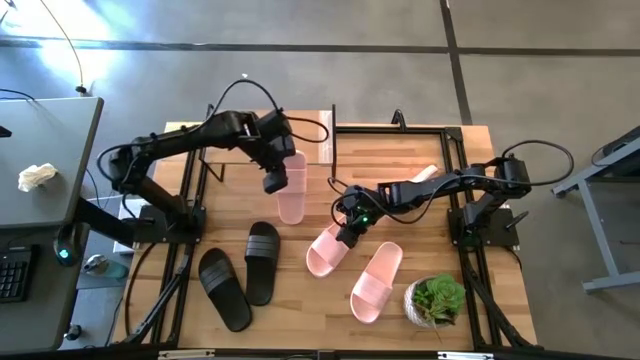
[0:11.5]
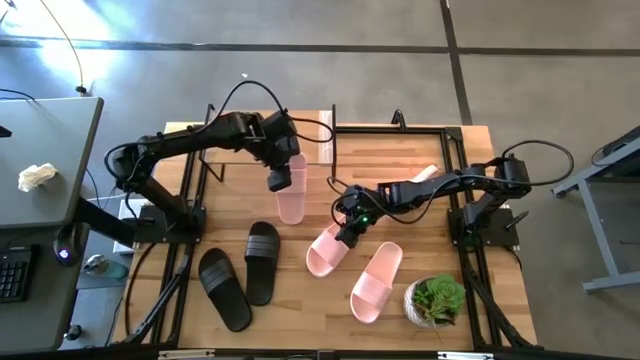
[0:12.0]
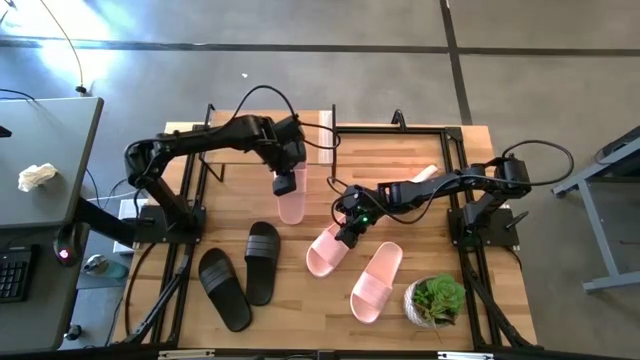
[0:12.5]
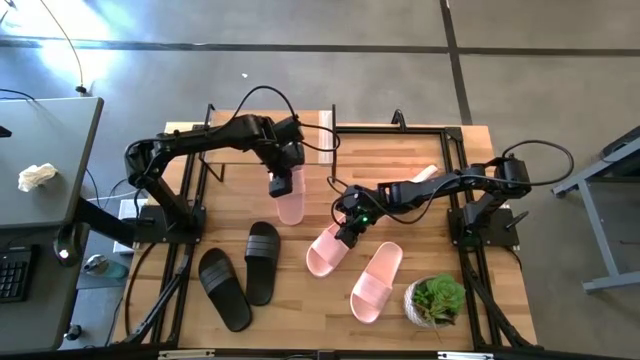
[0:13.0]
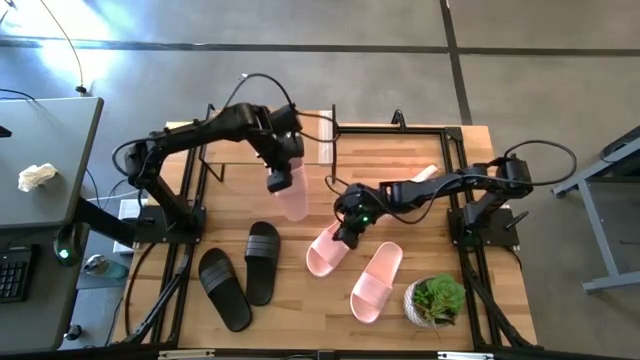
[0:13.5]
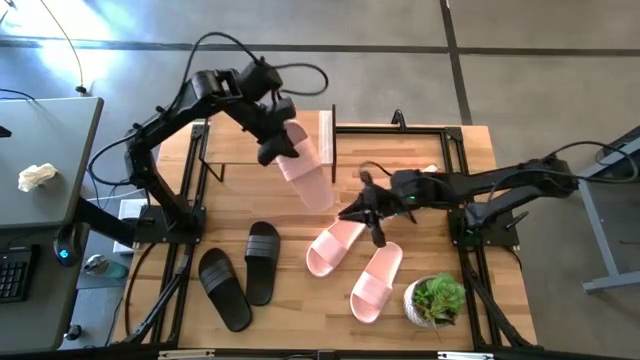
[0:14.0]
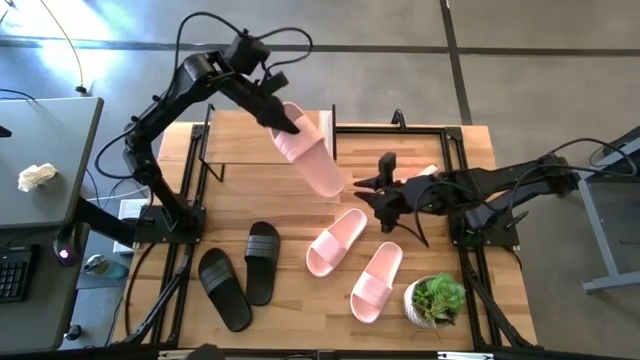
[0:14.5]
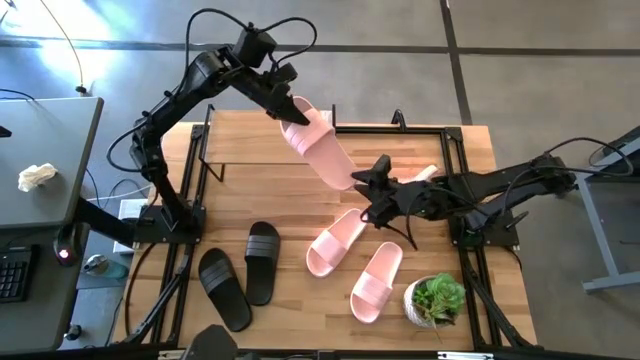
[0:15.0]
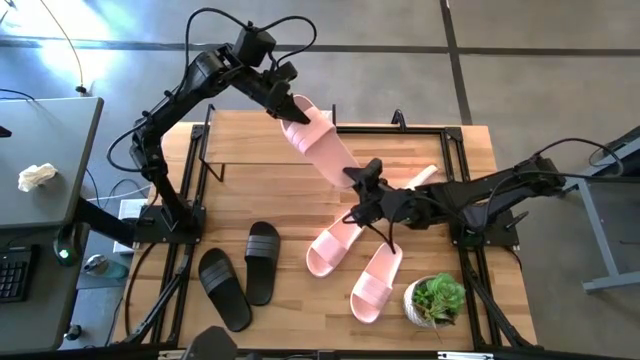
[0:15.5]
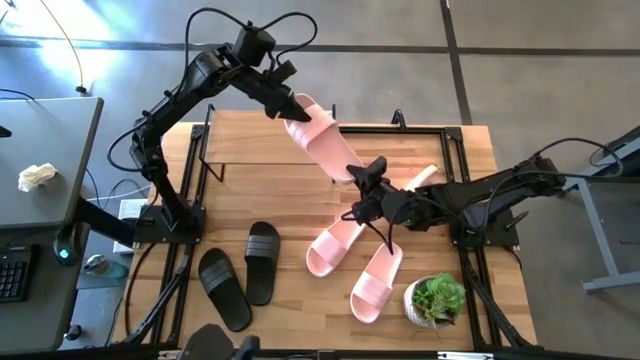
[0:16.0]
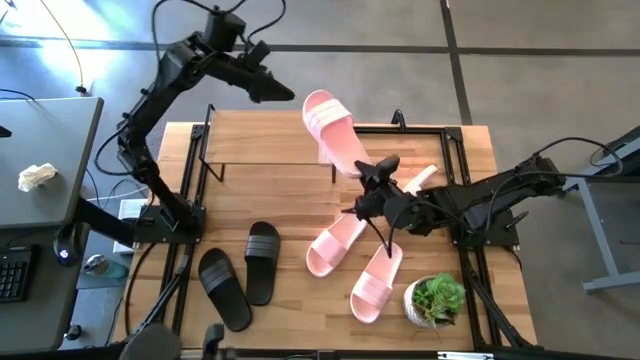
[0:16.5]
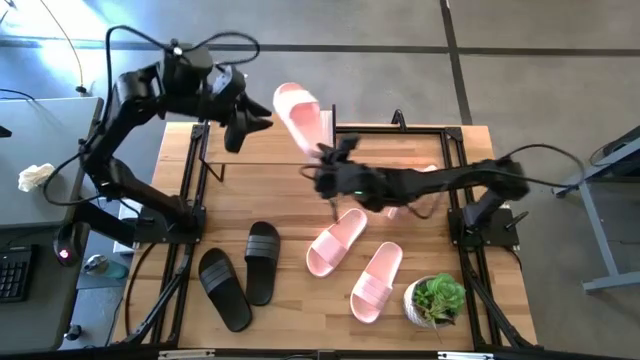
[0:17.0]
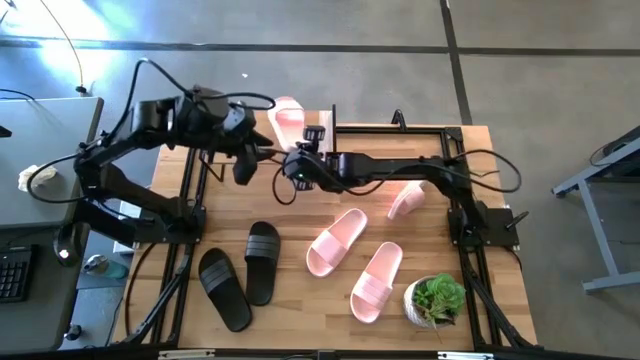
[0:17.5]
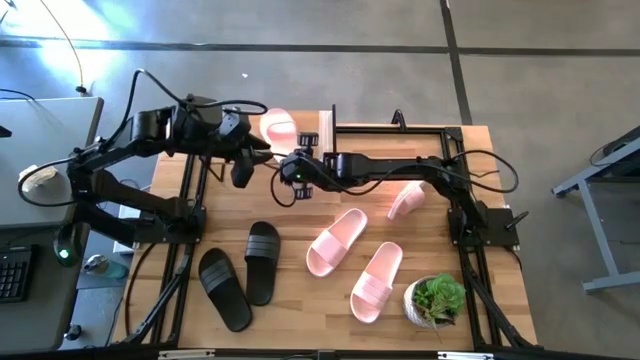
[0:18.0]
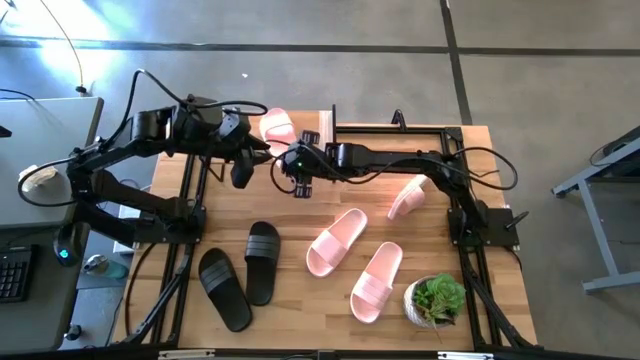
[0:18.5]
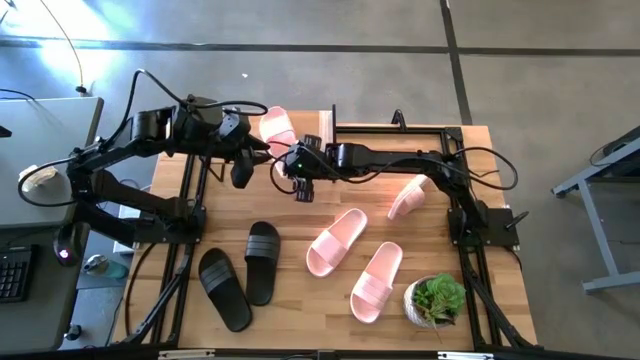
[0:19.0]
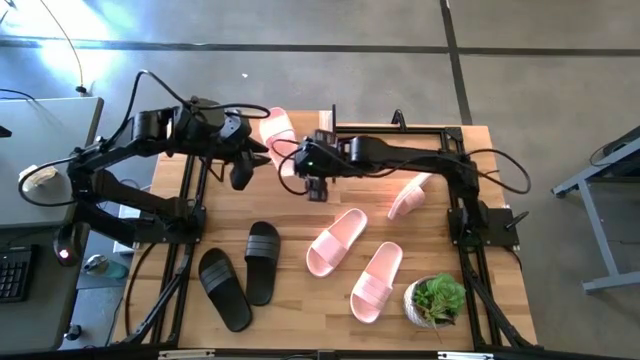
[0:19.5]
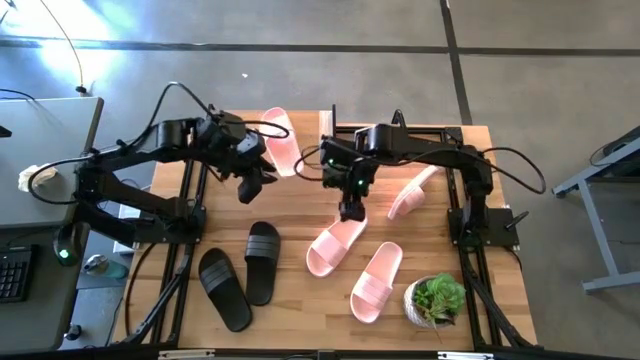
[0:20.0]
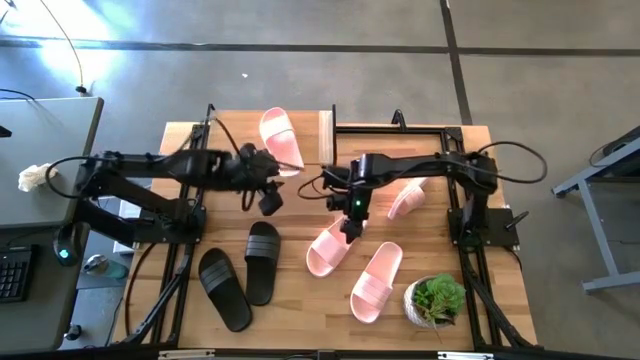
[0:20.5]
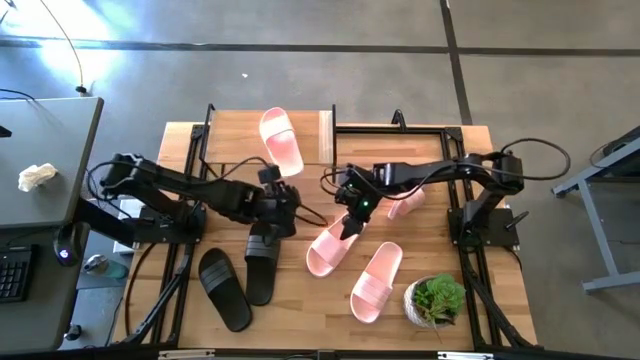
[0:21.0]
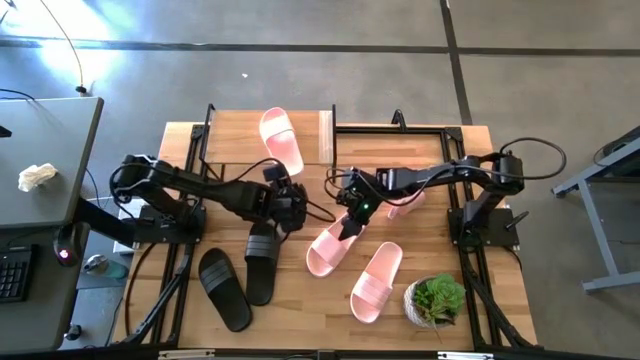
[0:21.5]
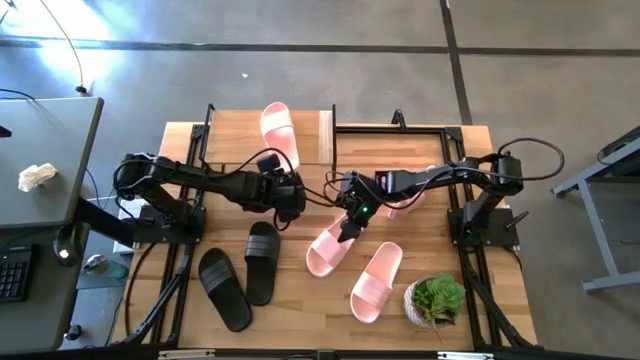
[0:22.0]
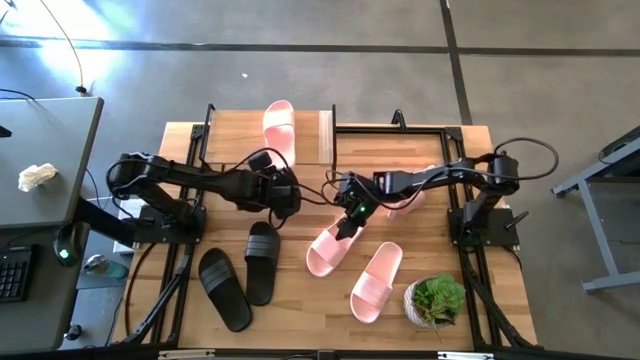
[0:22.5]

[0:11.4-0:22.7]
Task: Pick and place slides into the shelf
Put the pink slide on the shelf

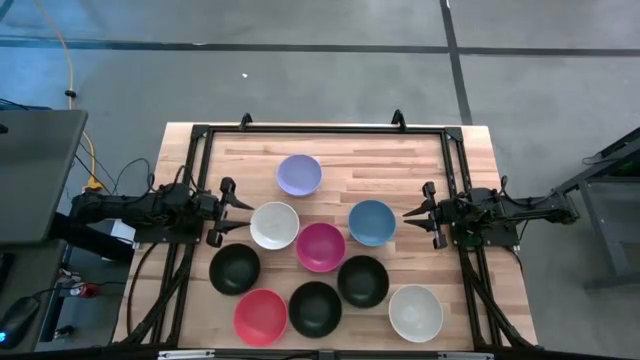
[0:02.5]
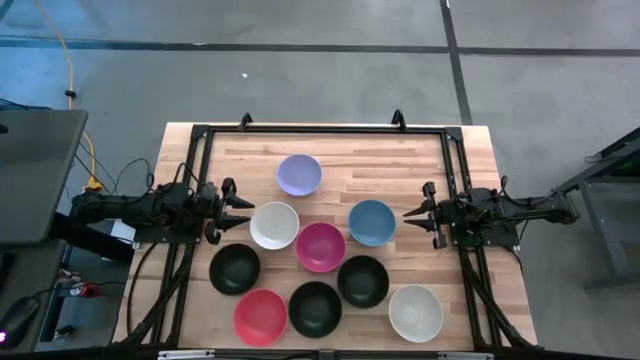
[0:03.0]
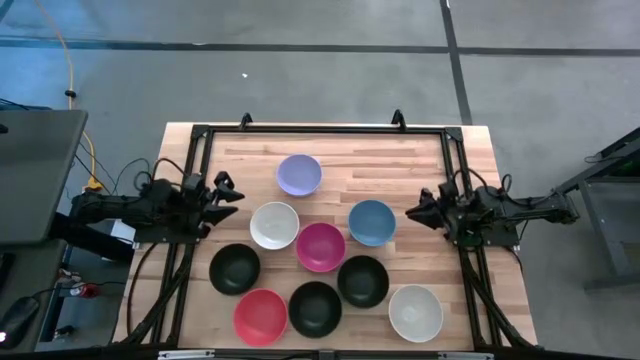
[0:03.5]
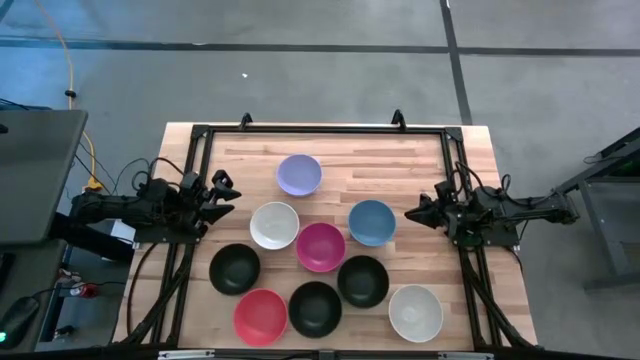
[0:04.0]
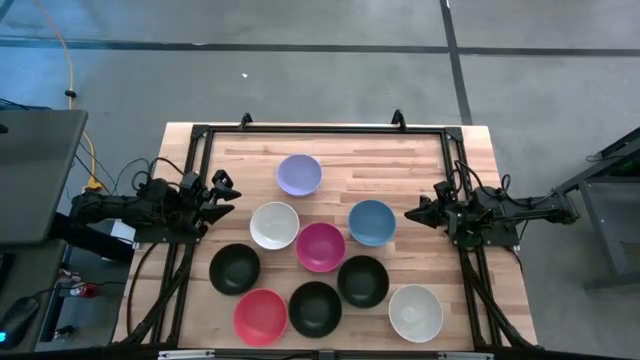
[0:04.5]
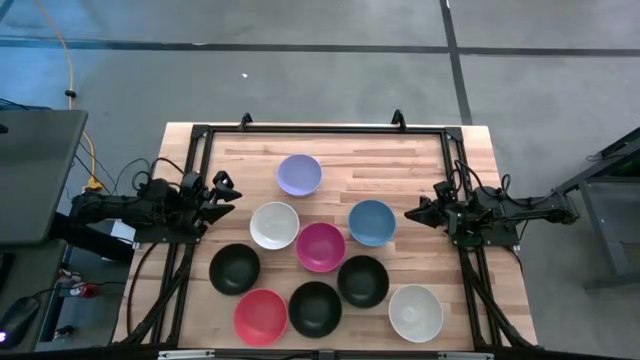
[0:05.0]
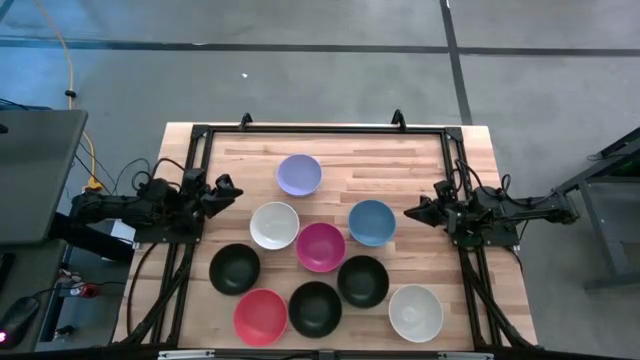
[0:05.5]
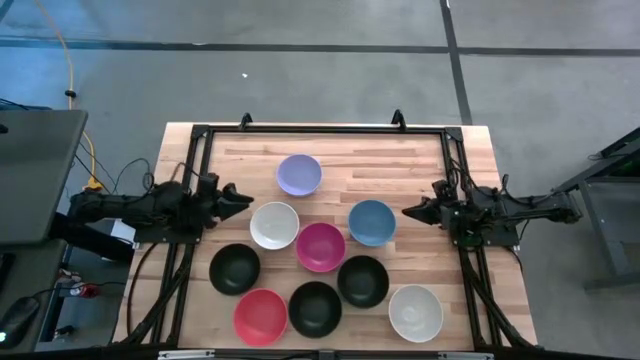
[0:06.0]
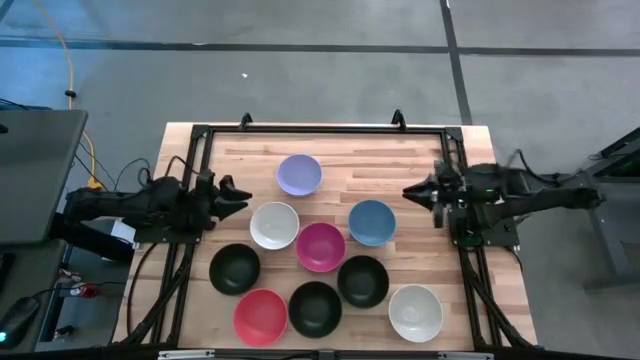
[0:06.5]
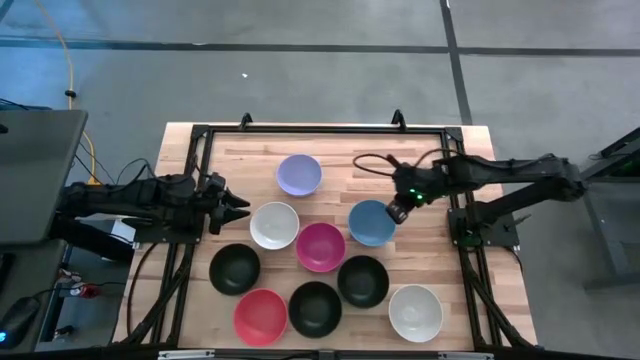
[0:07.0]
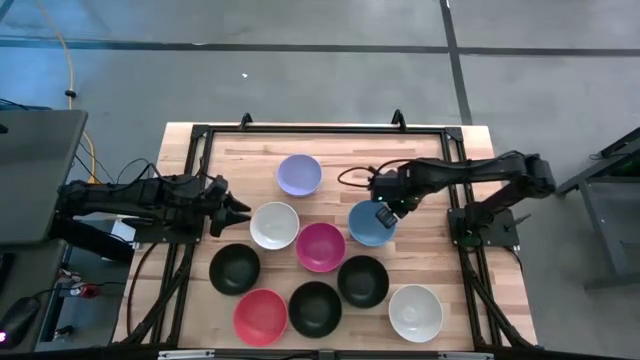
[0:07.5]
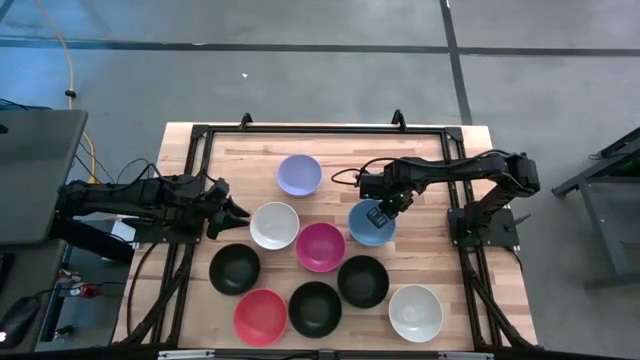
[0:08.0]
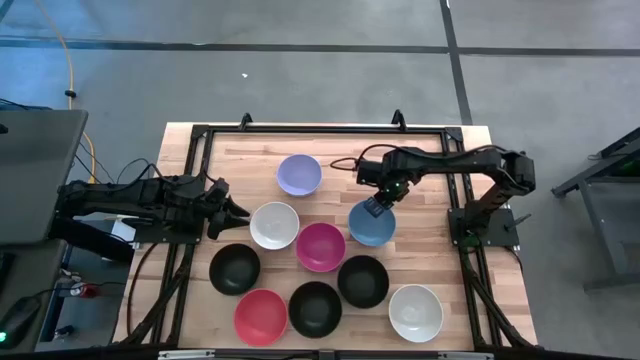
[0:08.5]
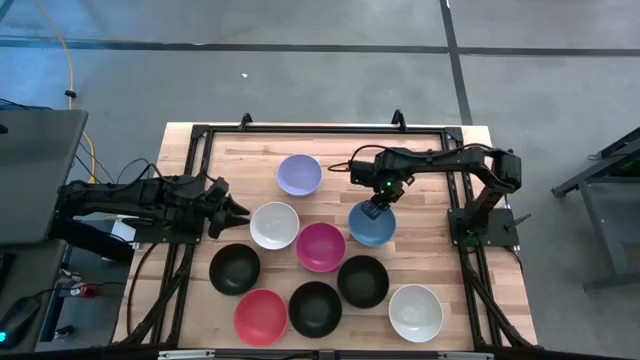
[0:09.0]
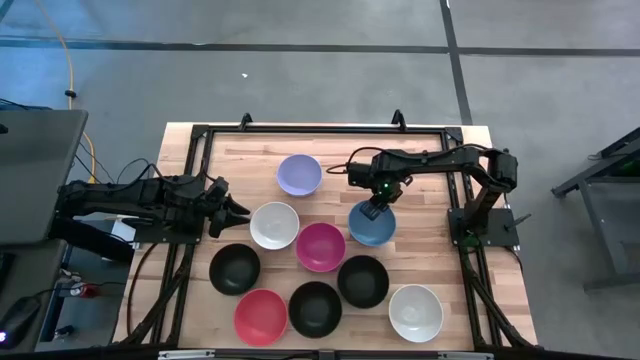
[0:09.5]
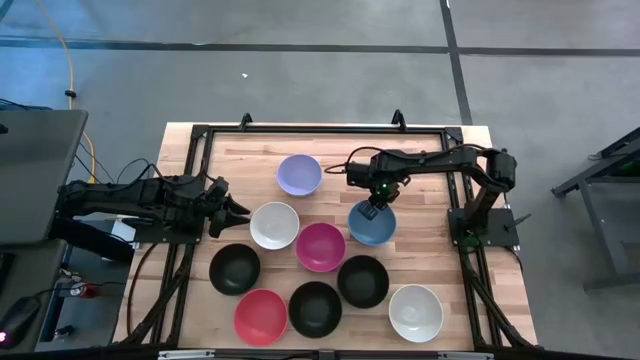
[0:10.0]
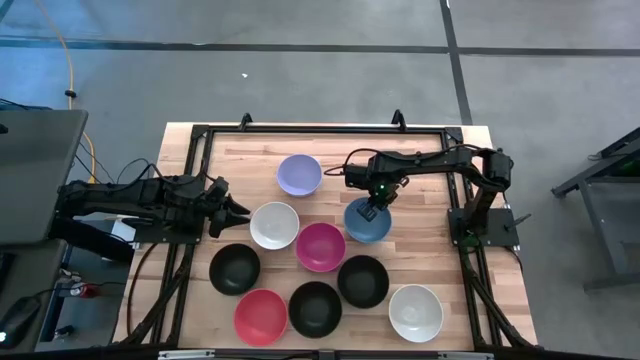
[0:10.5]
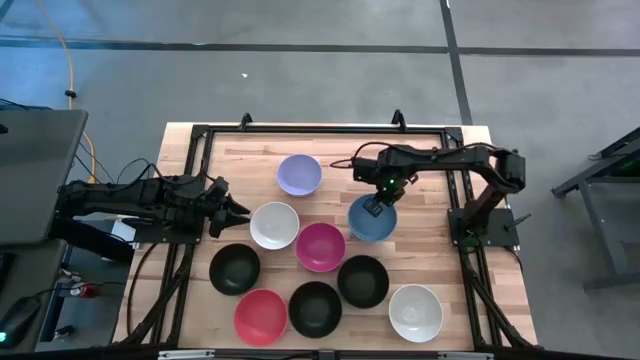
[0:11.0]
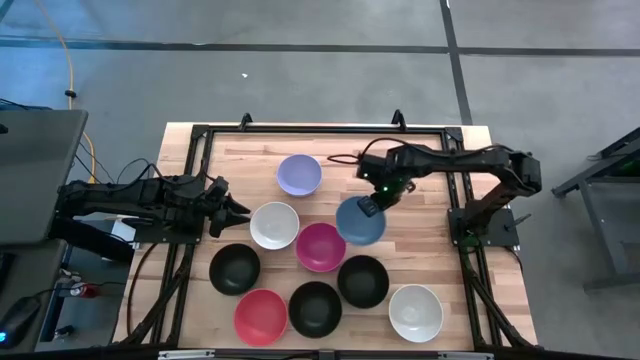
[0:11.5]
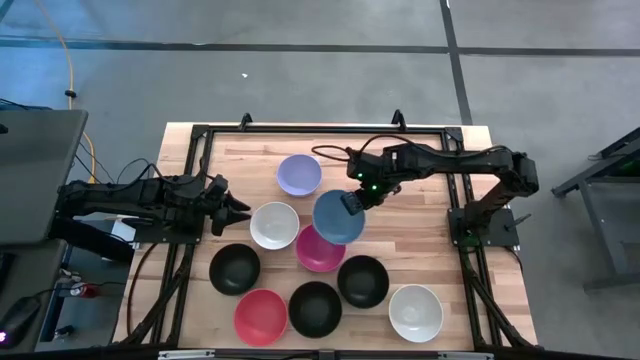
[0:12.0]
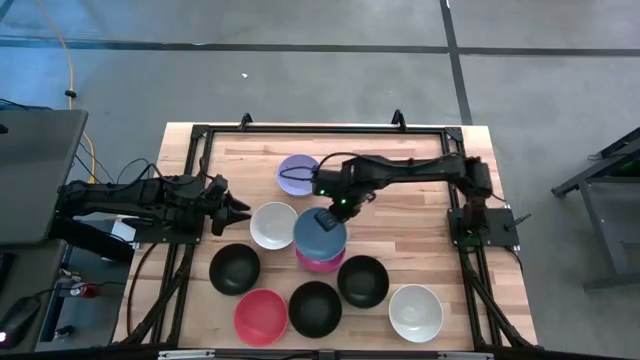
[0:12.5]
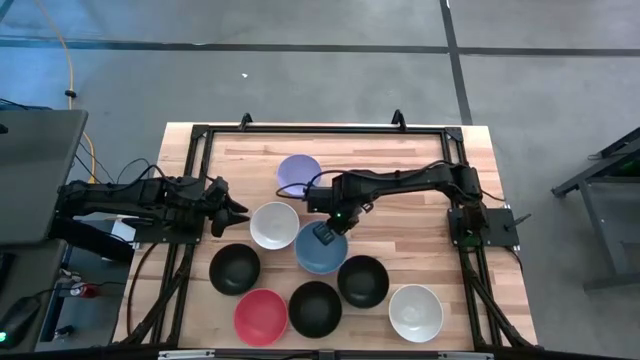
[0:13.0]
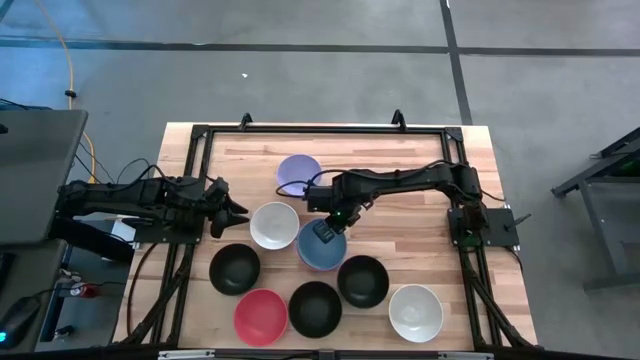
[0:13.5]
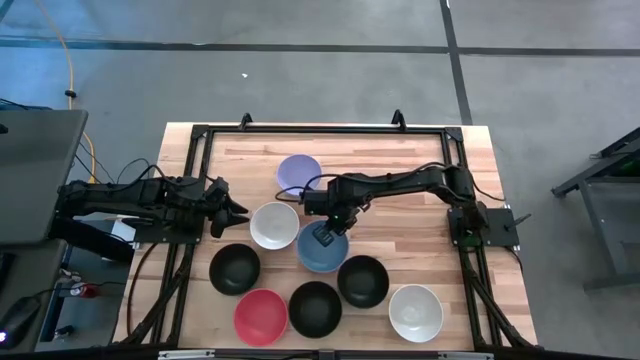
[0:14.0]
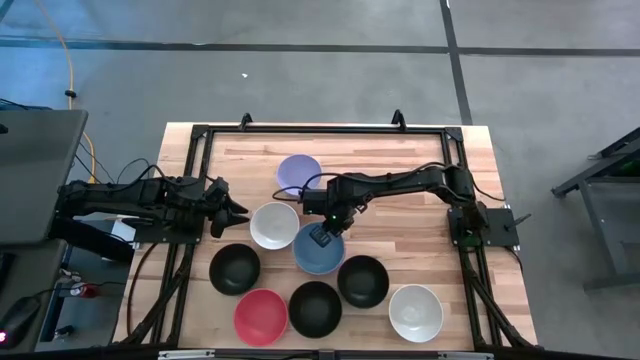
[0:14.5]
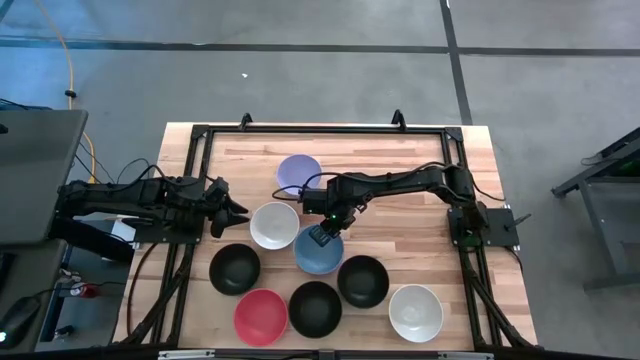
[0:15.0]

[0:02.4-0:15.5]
Task: Nest bowls inside each other
Stack the blue bowl on the pink bowl
